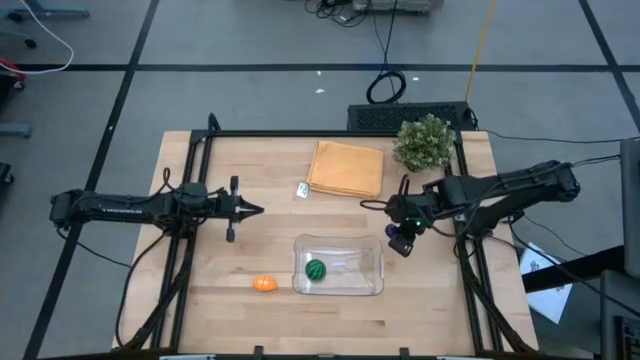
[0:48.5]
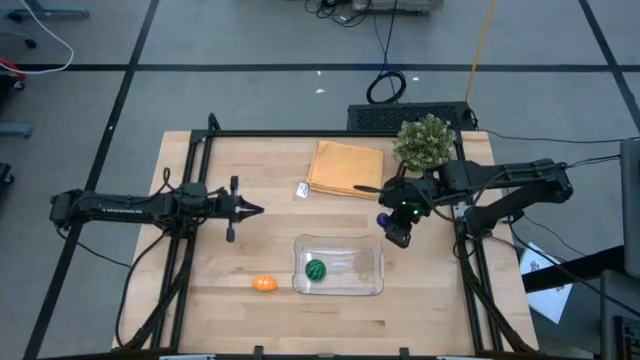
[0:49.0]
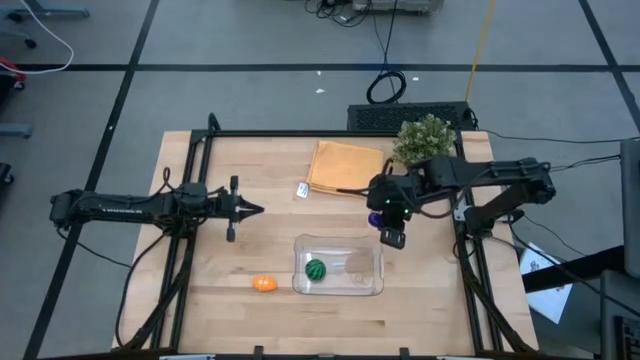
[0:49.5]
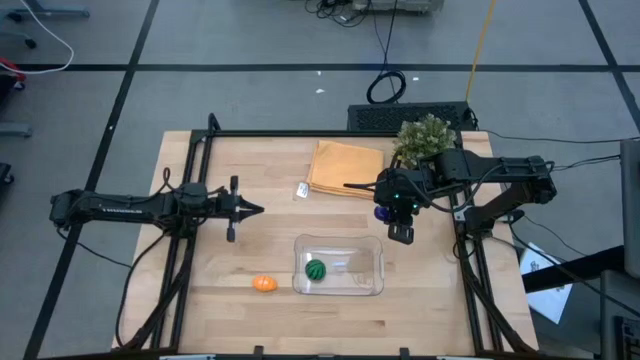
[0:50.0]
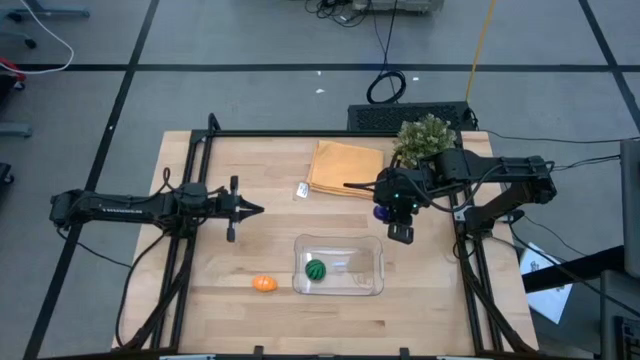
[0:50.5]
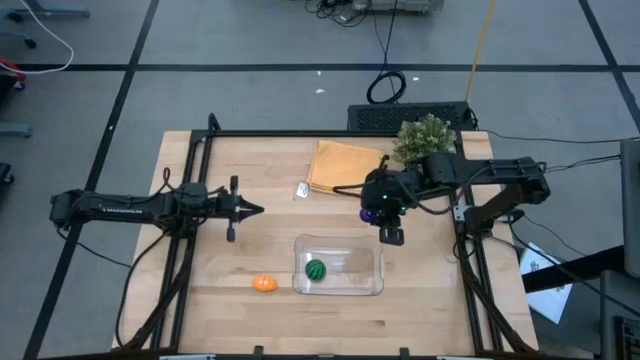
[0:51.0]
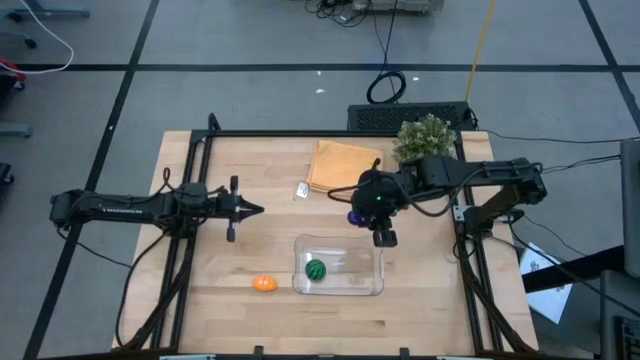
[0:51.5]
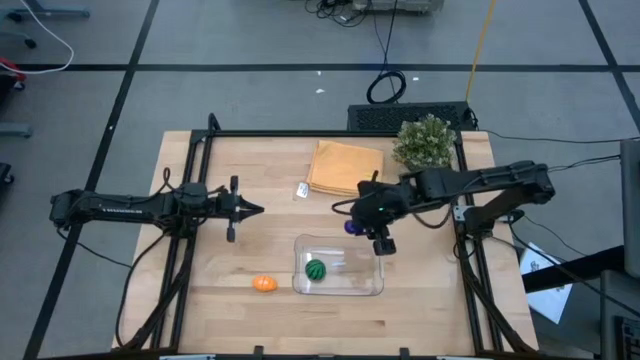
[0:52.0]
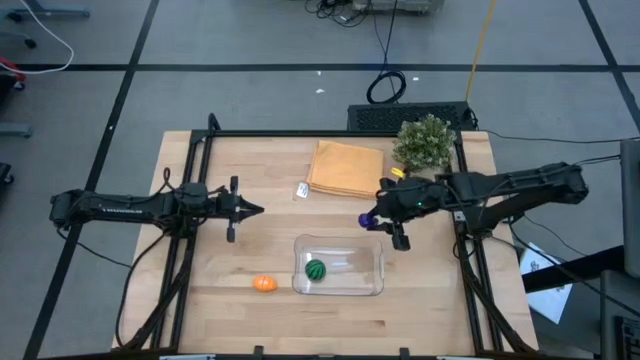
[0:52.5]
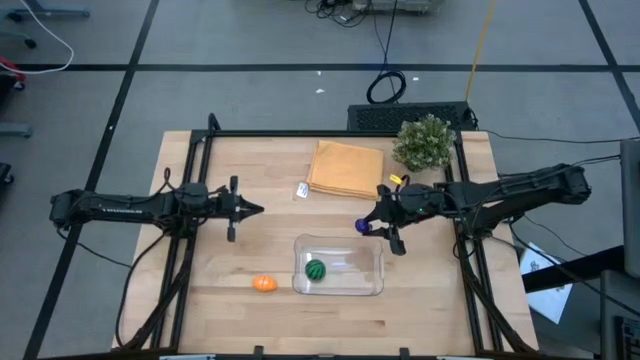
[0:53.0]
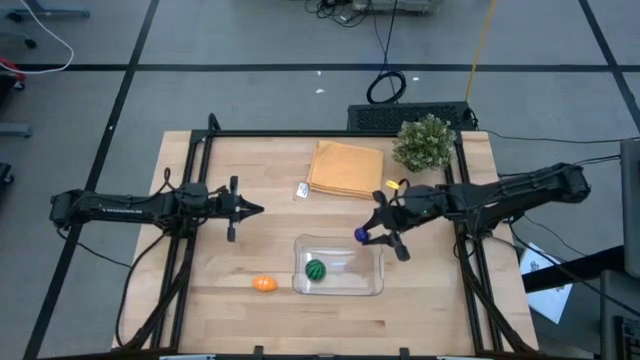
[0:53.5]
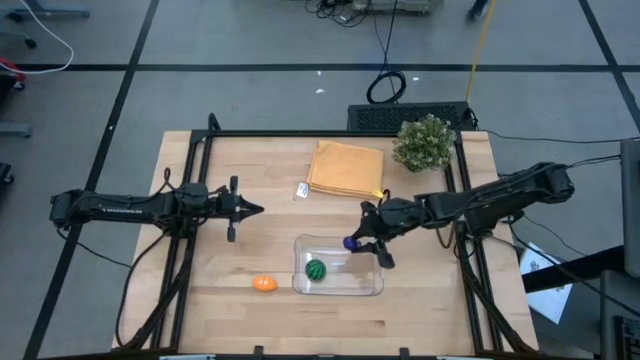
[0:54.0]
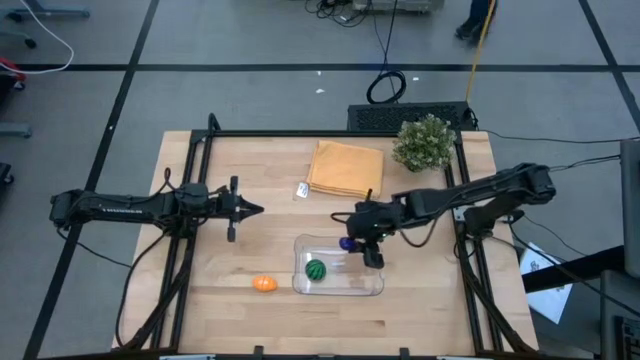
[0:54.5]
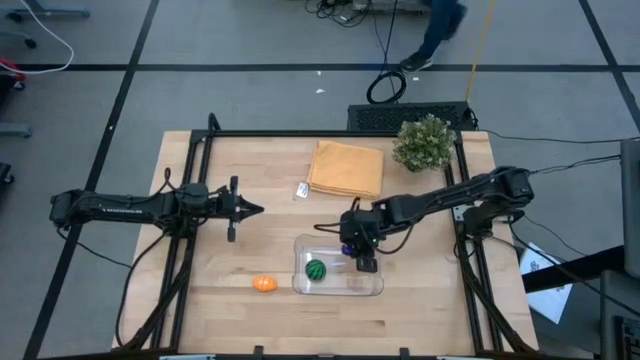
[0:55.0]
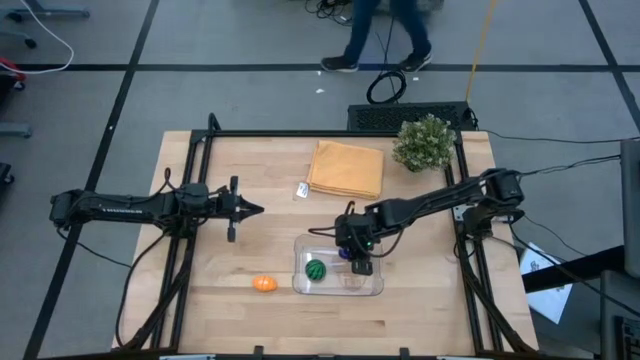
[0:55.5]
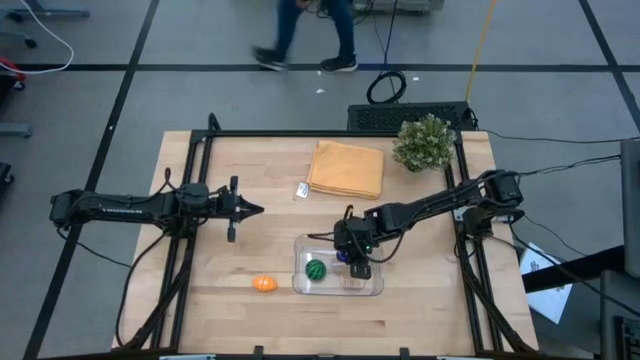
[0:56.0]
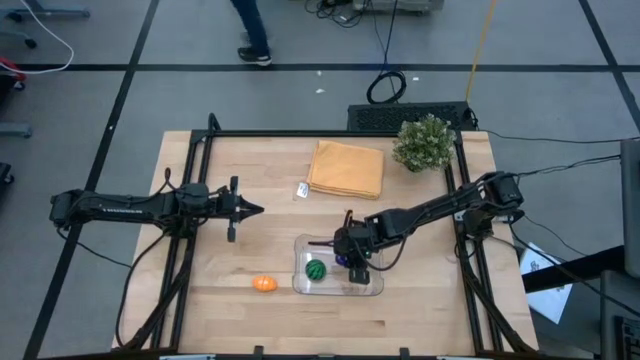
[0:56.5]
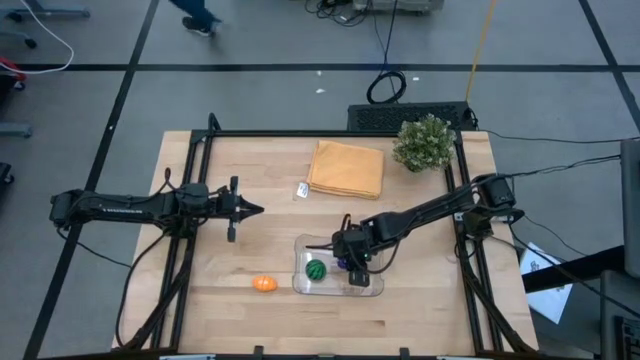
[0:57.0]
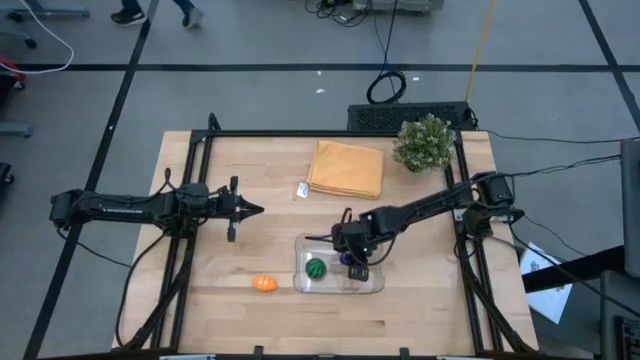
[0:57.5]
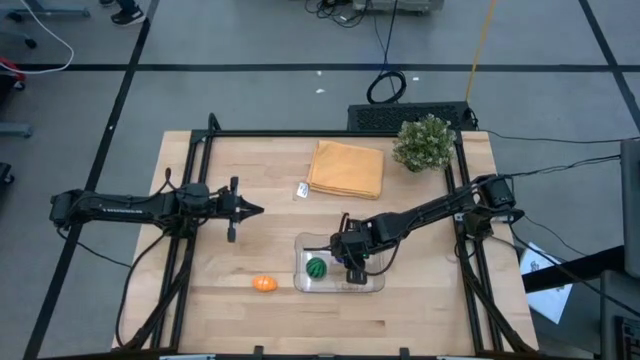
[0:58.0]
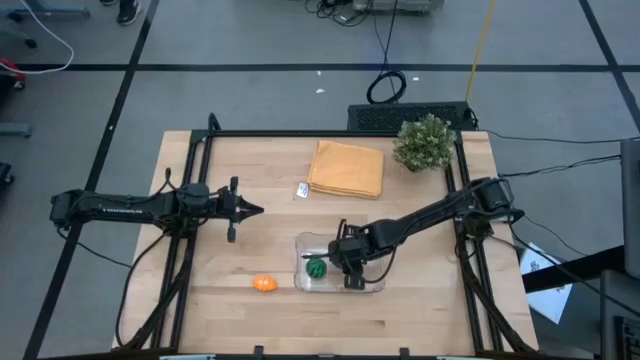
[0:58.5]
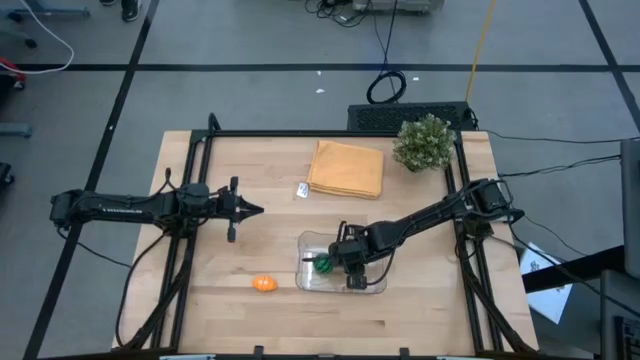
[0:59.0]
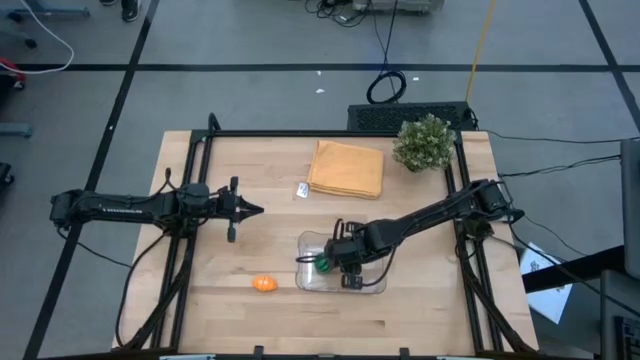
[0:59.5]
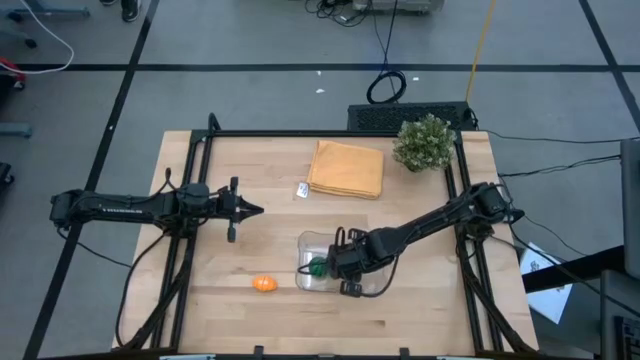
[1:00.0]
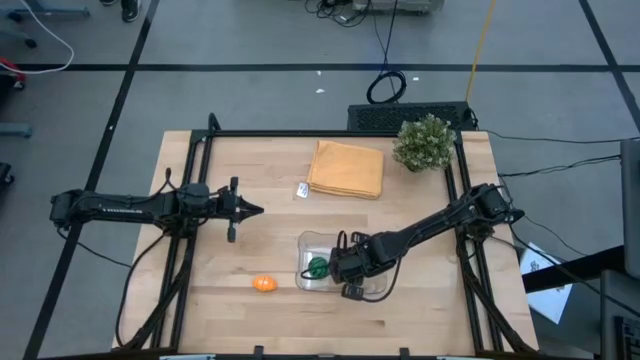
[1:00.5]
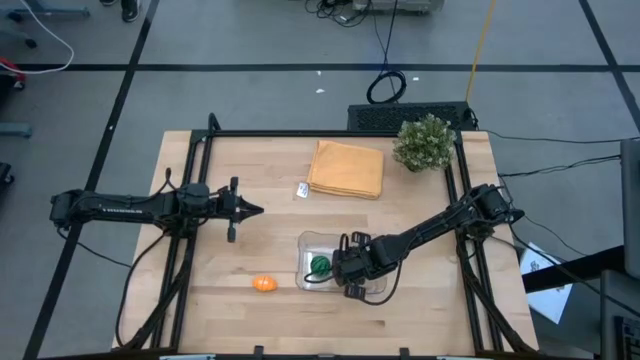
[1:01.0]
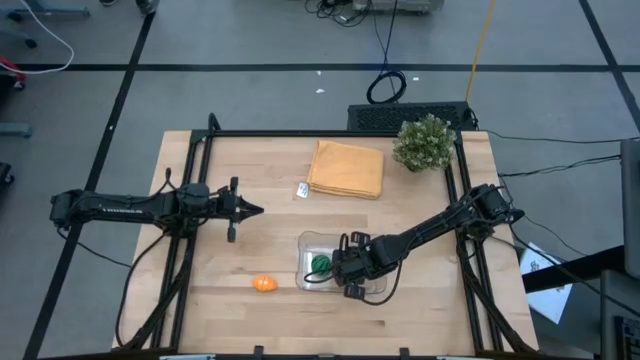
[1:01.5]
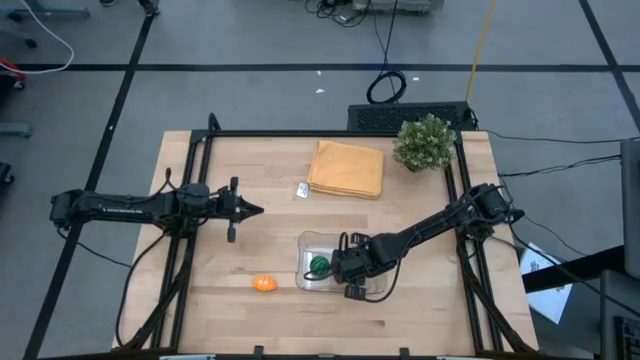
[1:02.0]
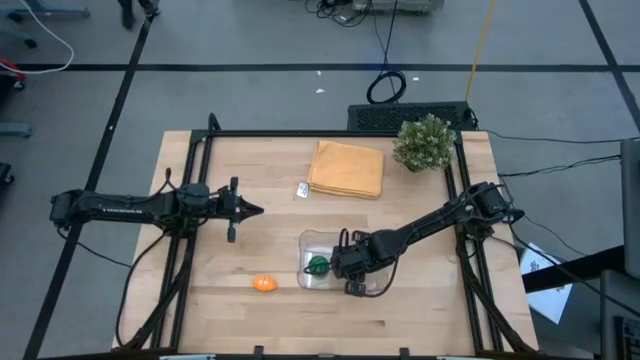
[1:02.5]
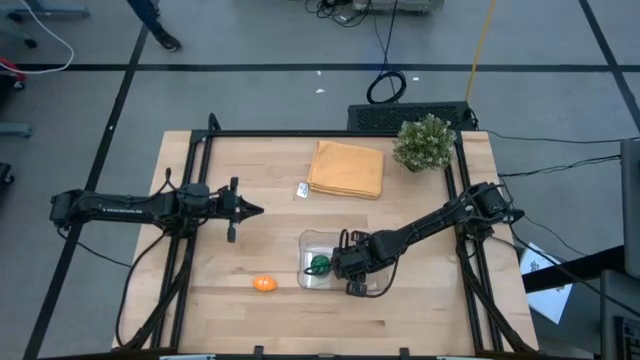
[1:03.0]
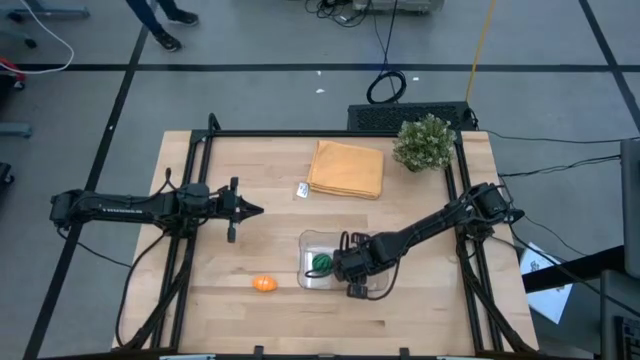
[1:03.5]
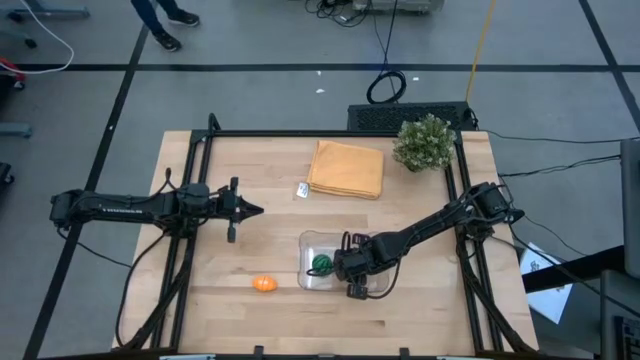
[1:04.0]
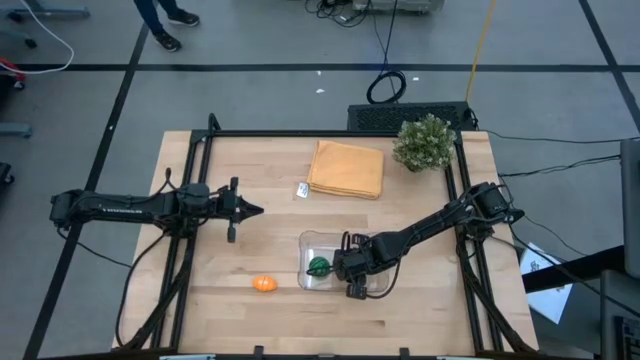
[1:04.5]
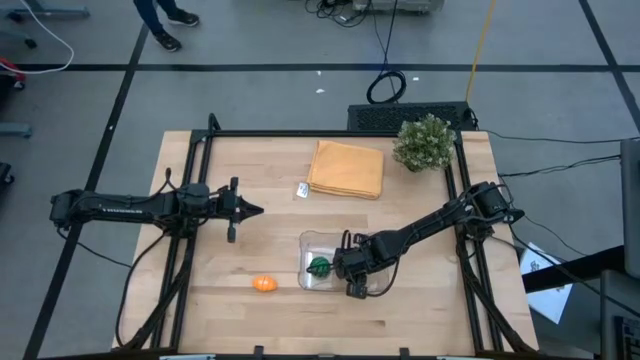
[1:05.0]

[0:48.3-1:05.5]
Task: Pick and placing Produce into tupperware
Put the eggplant into the transparent bin

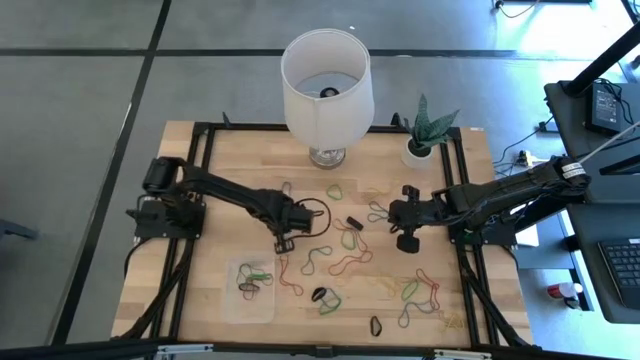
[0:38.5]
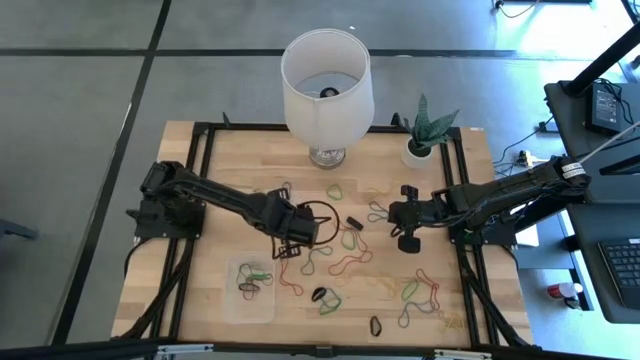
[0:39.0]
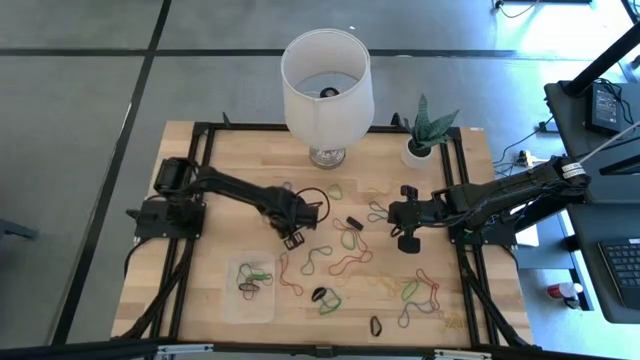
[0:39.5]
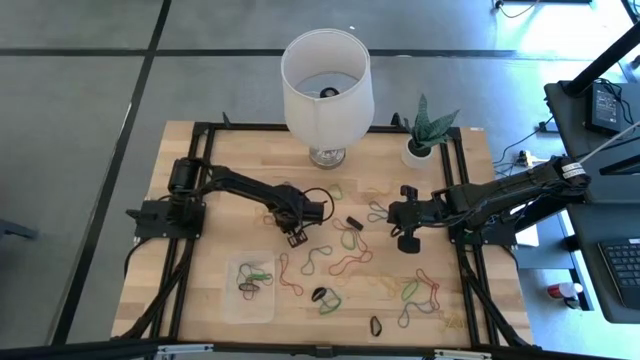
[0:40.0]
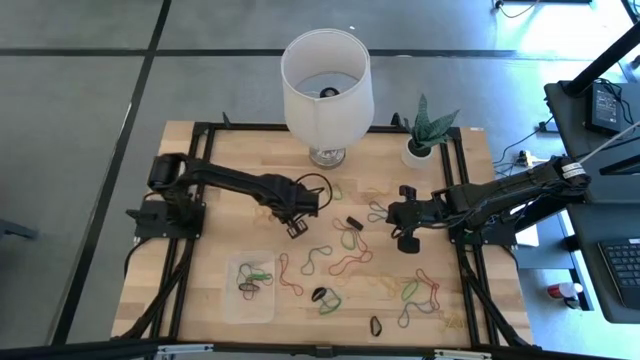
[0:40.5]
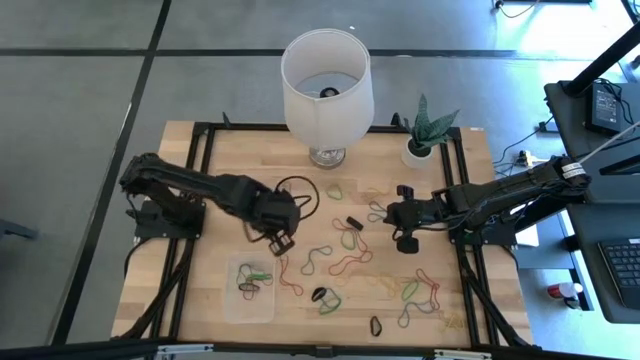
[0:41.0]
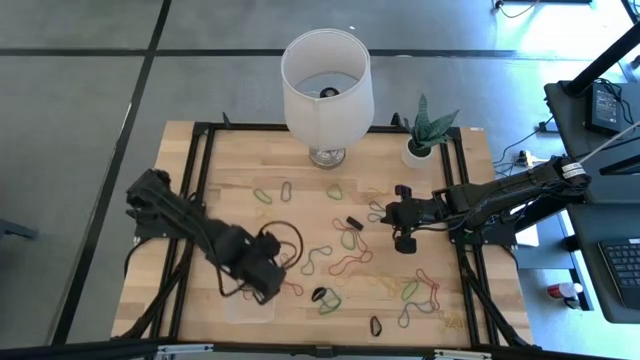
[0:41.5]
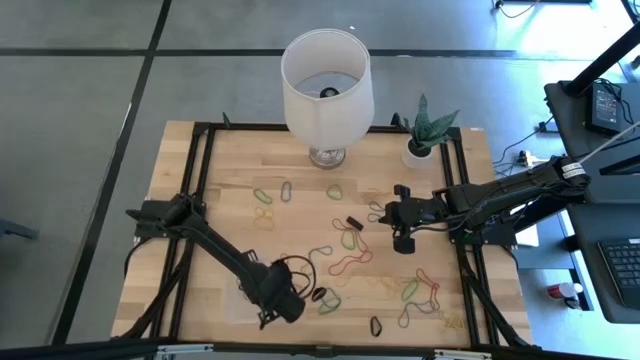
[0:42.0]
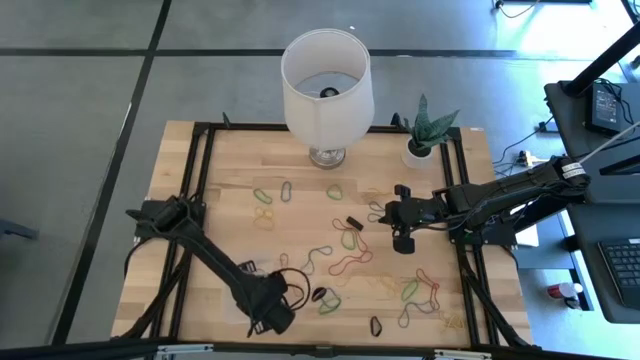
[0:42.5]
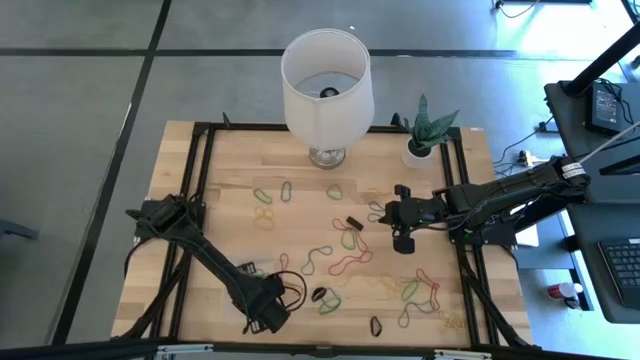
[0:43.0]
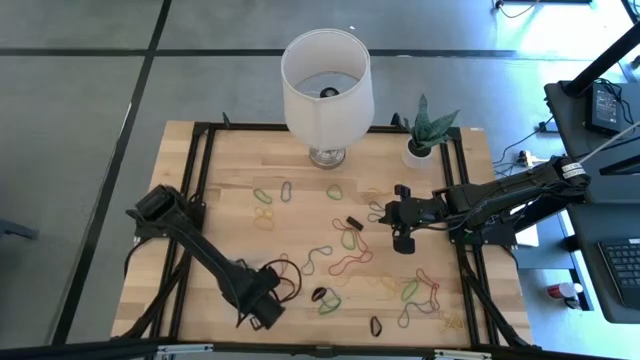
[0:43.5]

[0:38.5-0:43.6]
Task: Pick and place rubber bands into bin
Put the red rubber band into the transparent bin
